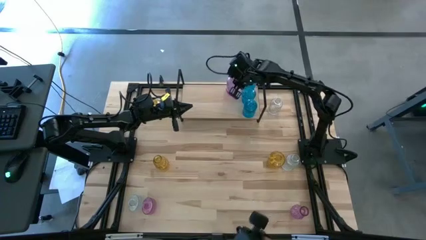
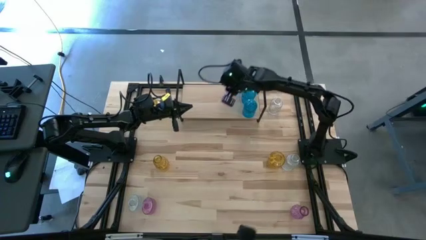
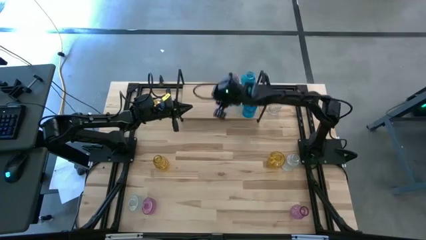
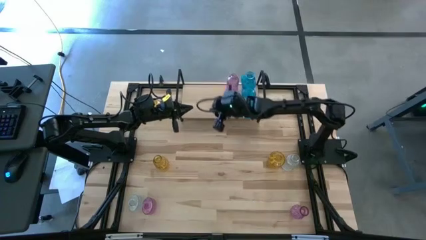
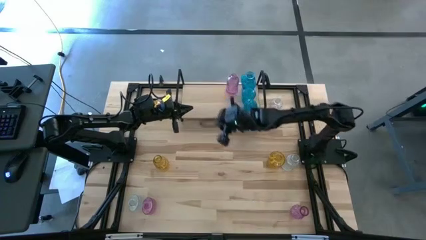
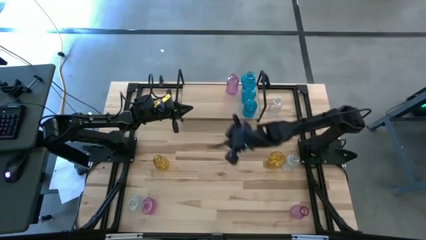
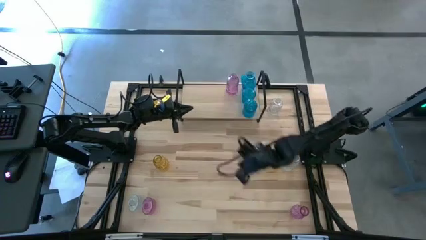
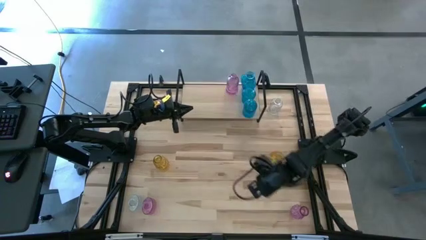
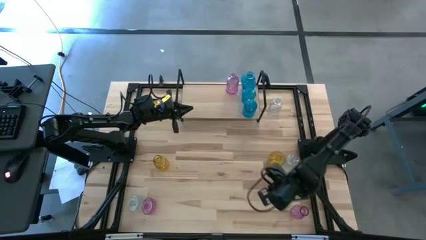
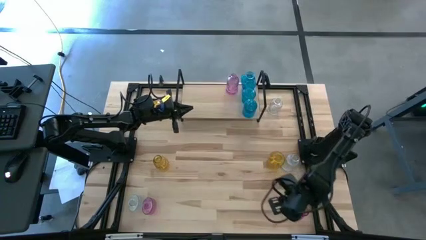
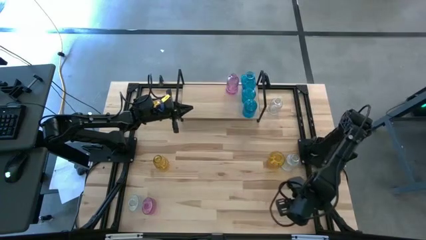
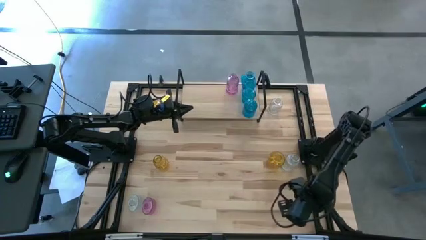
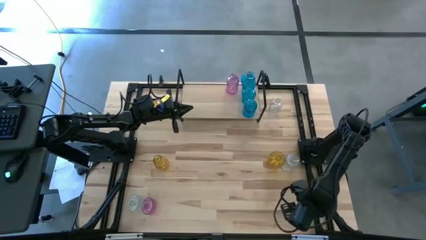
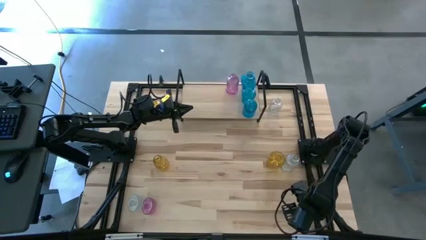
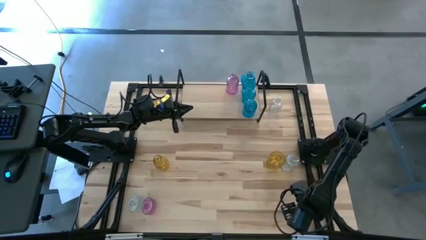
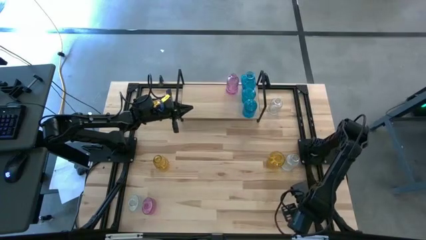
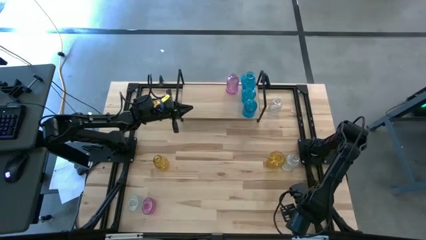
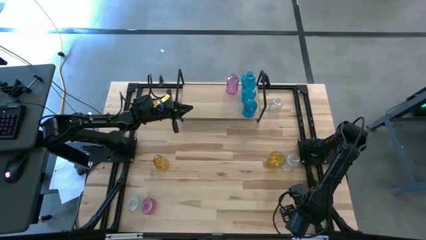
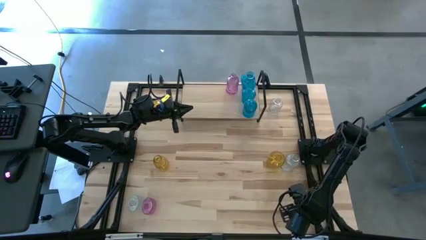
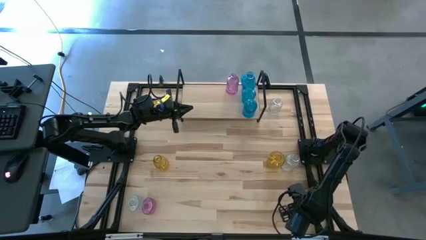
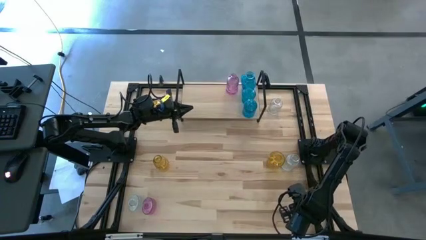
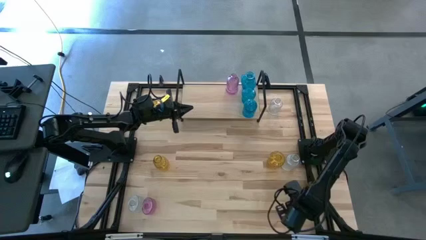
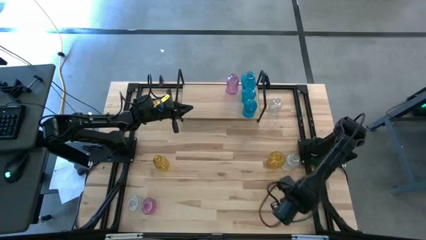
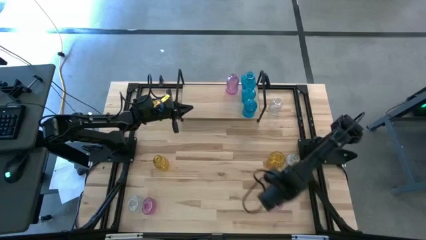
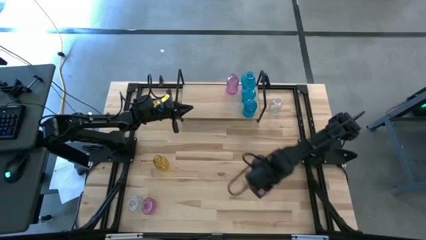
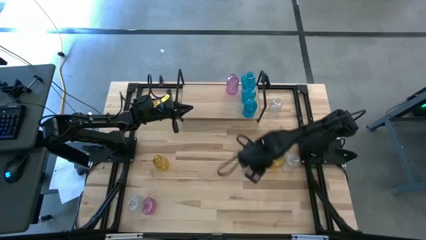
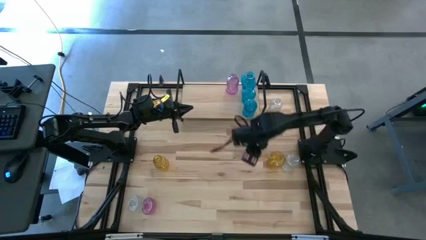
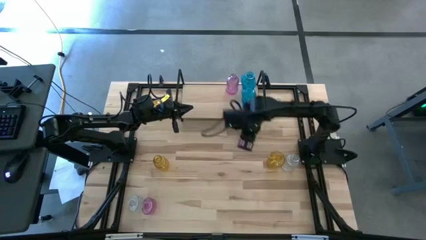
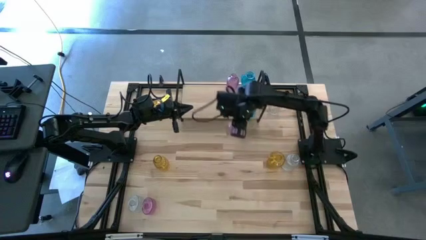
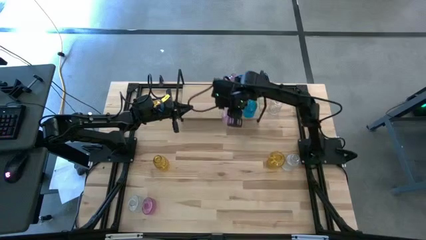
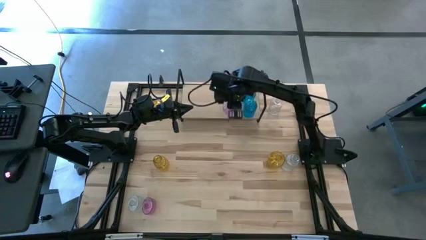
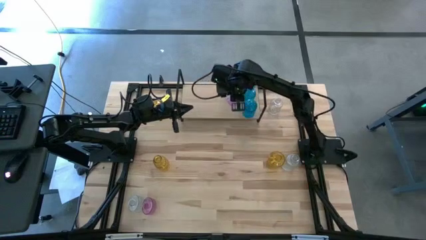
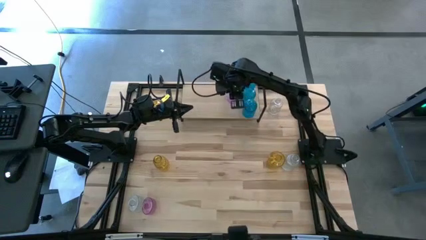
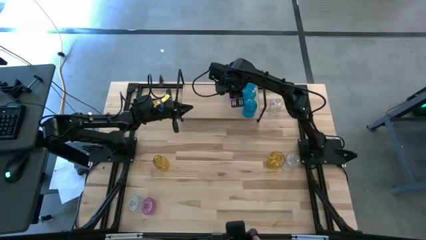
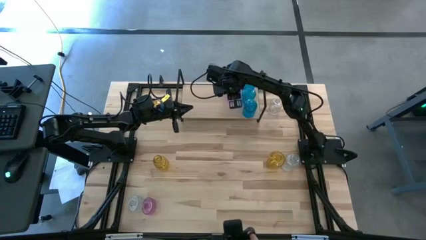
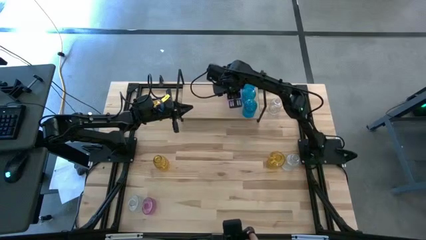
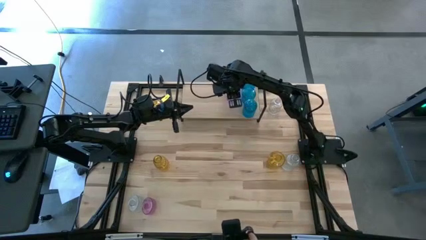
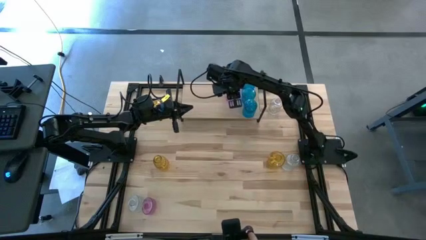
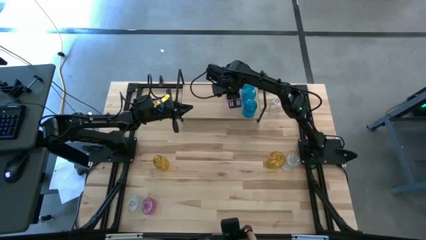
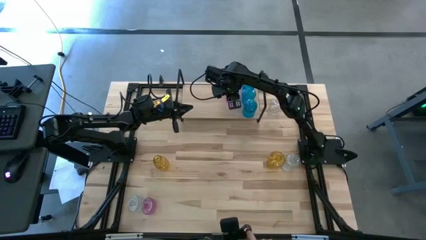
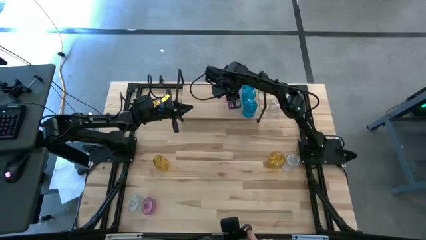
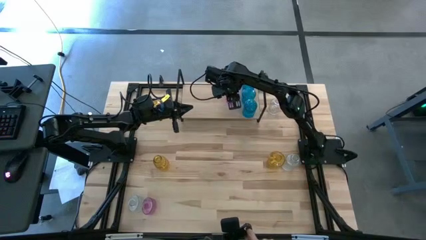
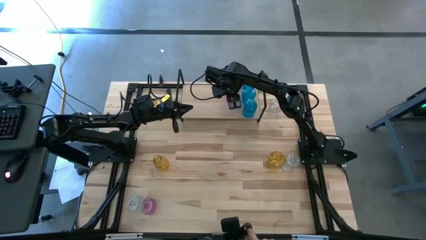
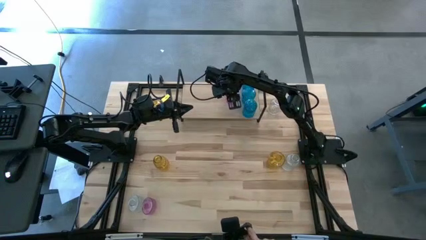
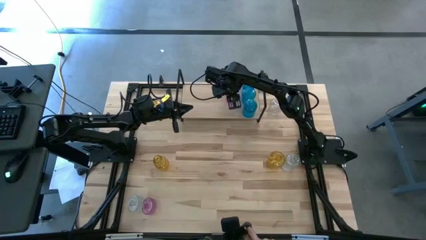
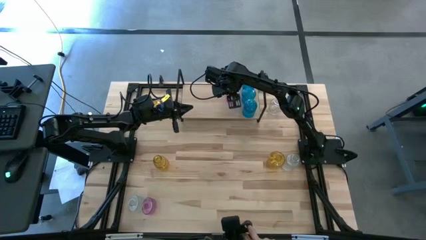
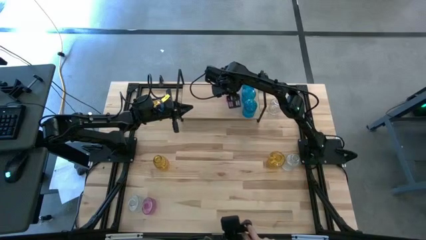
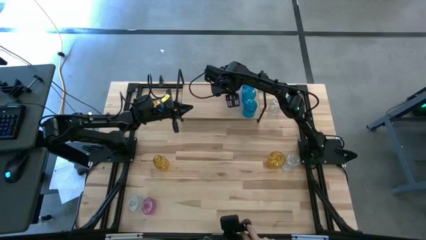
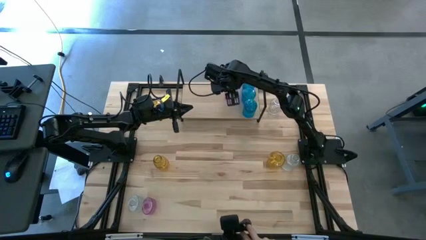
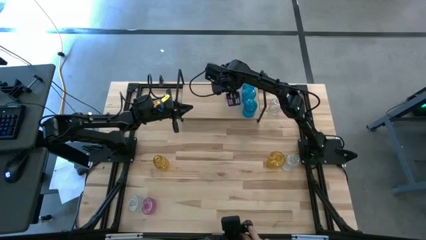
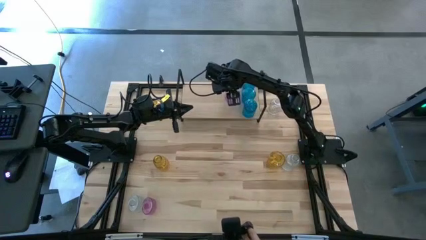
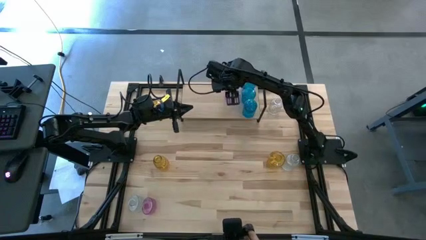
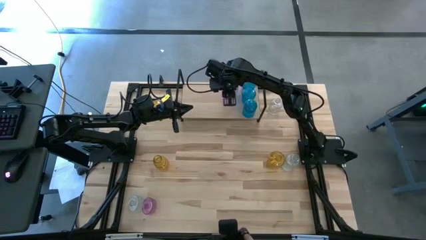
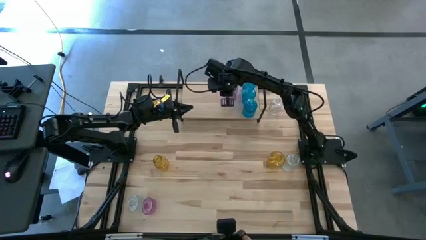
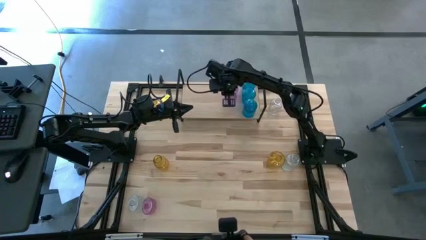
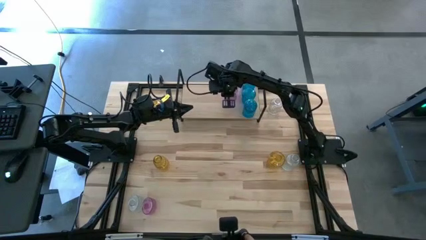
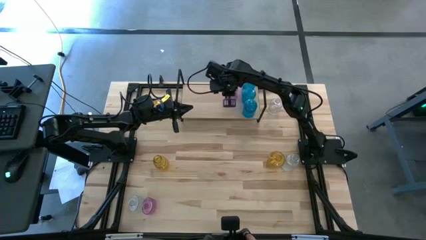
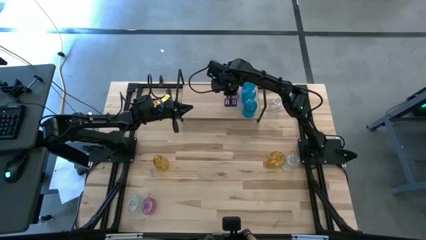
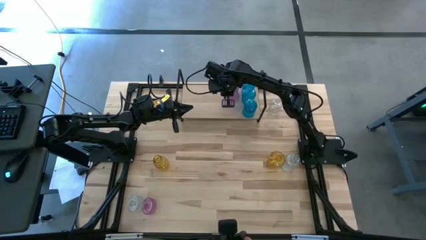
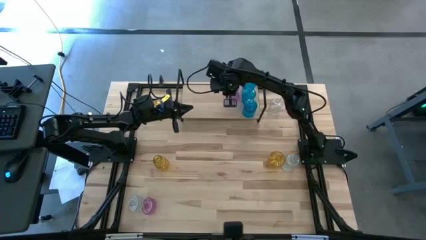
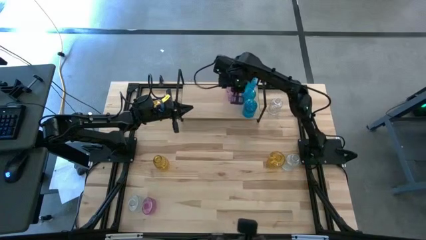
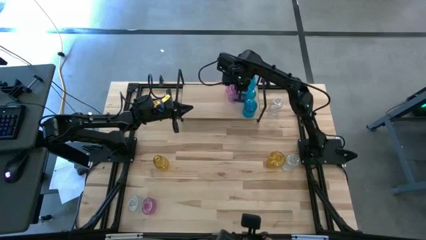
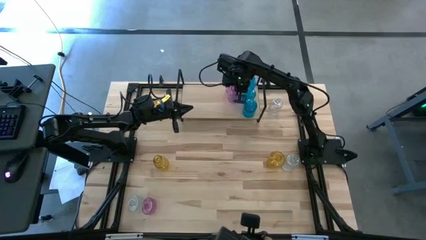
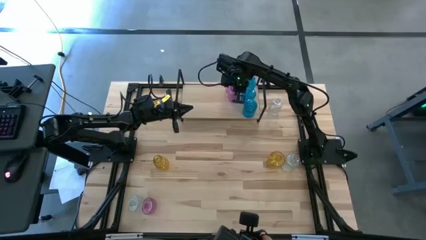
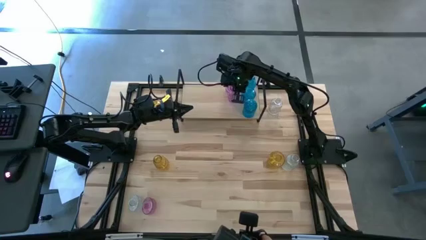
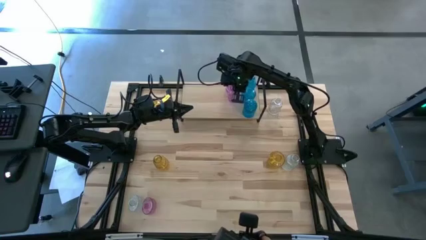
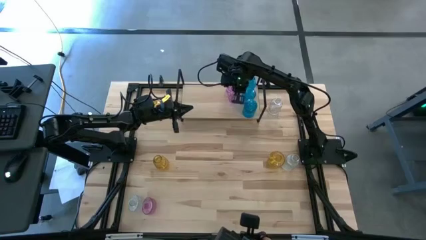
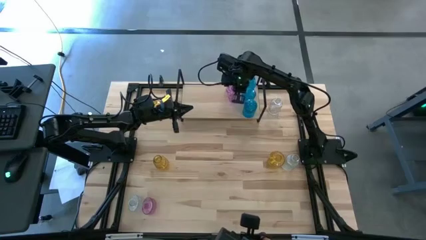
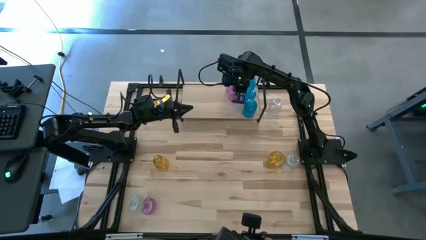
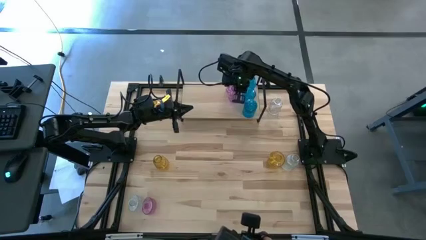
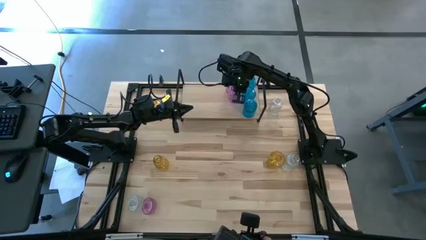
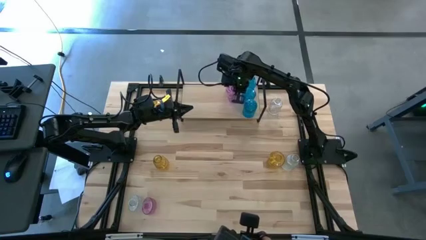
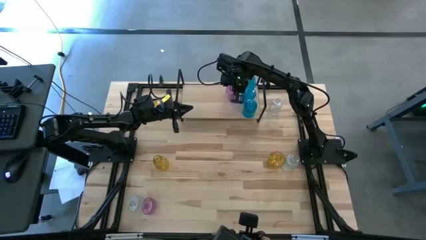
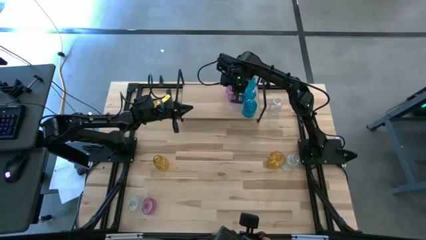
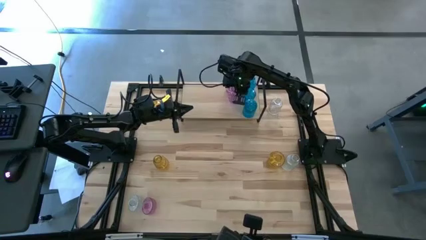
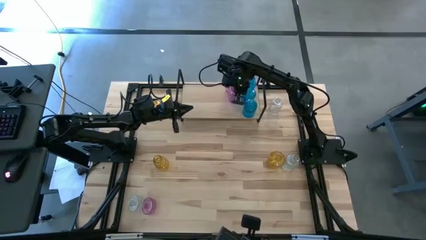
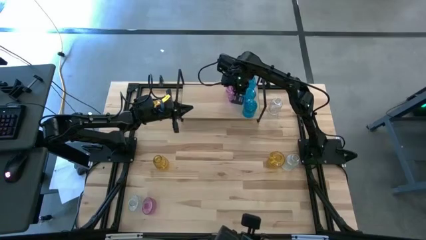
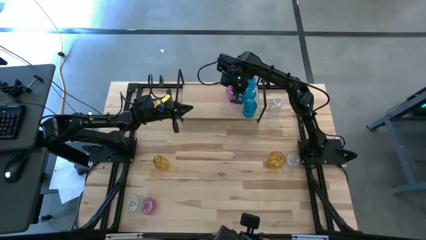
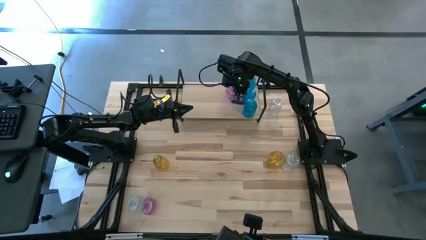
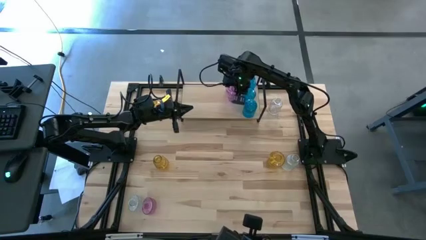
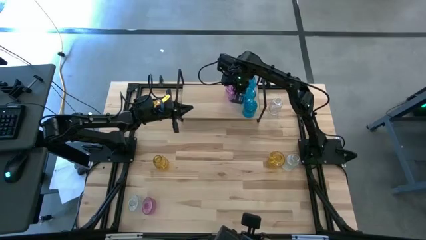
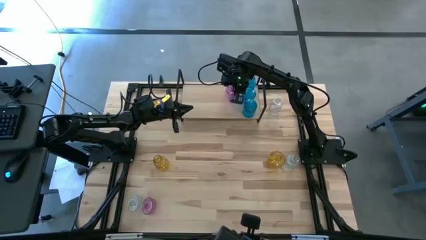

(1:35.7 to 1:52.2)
Task: sort vases onto shelf
Put the right purple vase on the shelf aligned with the other purple vase
